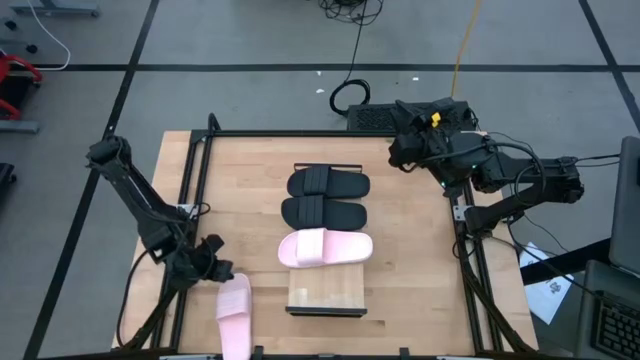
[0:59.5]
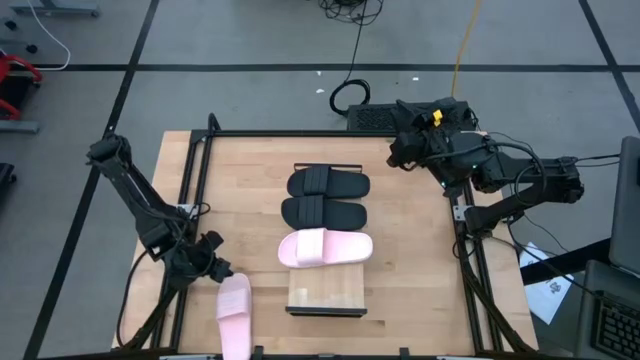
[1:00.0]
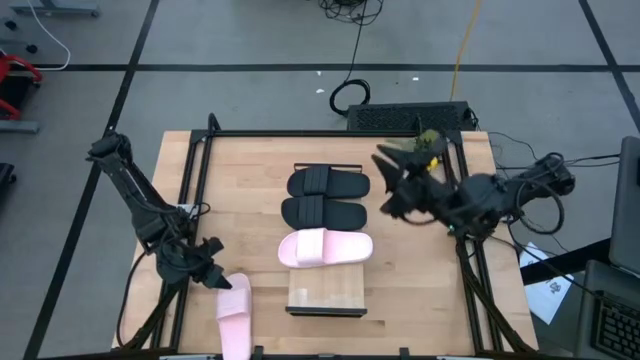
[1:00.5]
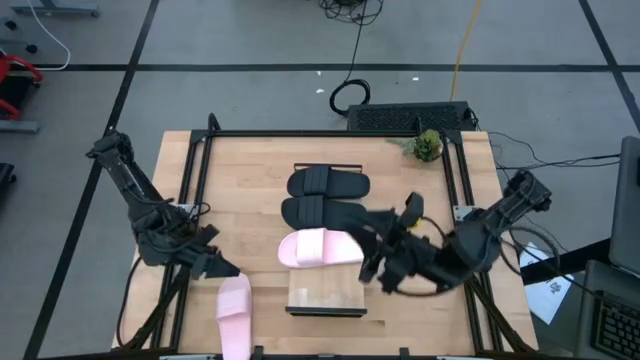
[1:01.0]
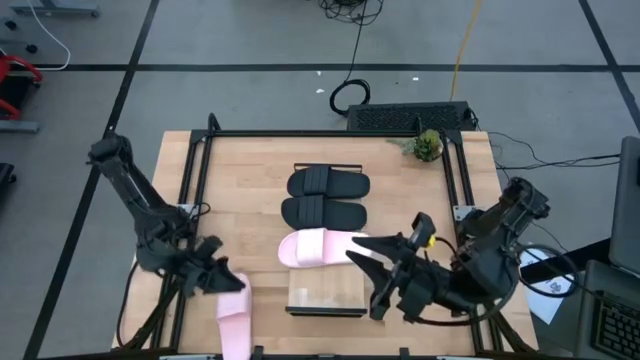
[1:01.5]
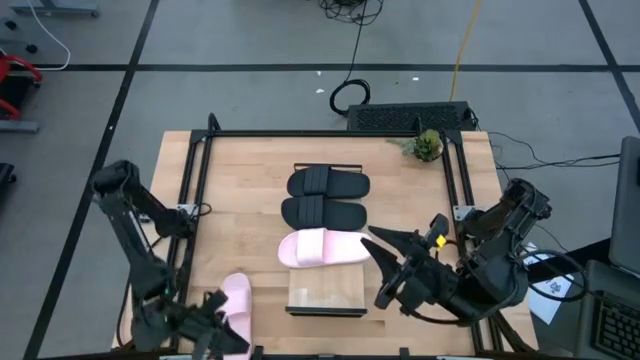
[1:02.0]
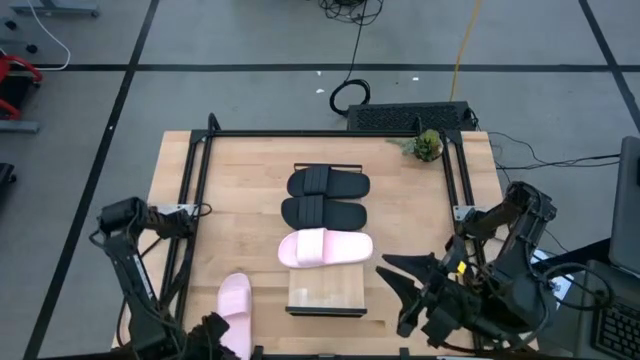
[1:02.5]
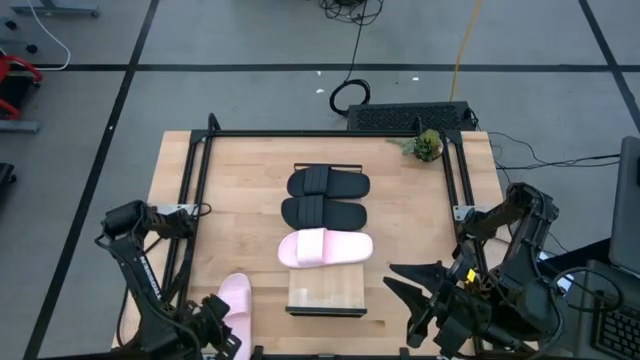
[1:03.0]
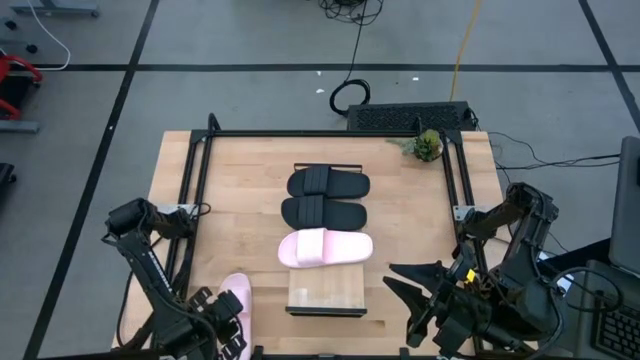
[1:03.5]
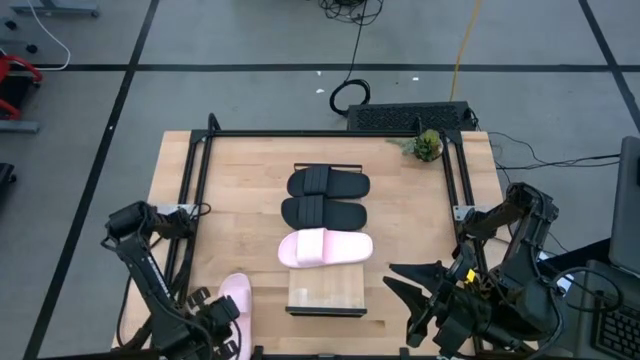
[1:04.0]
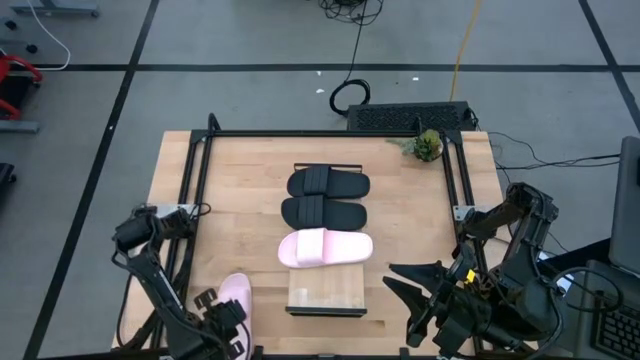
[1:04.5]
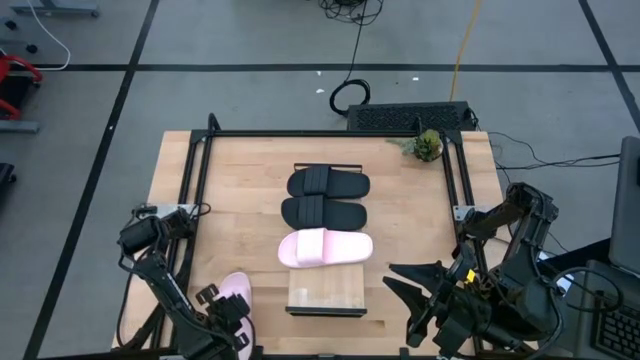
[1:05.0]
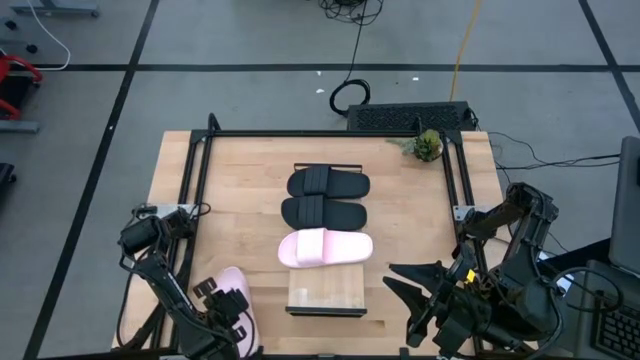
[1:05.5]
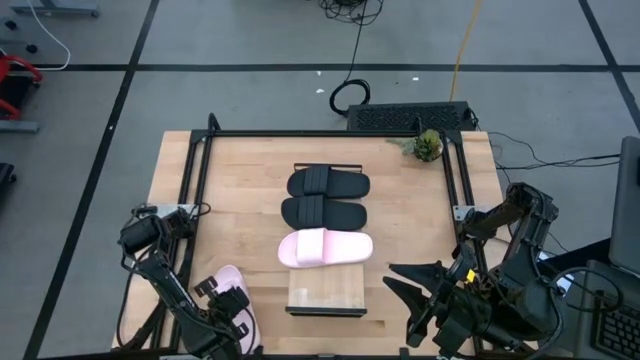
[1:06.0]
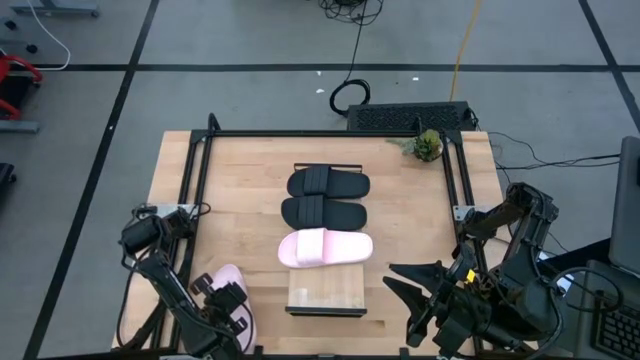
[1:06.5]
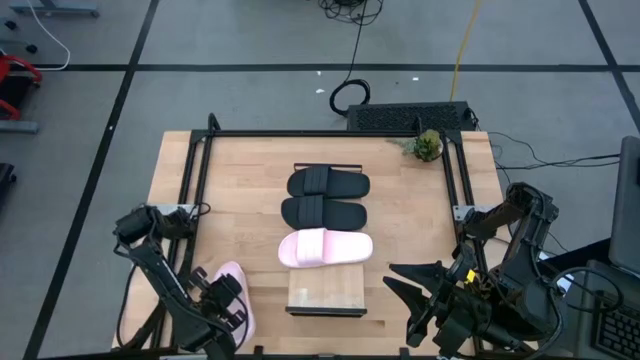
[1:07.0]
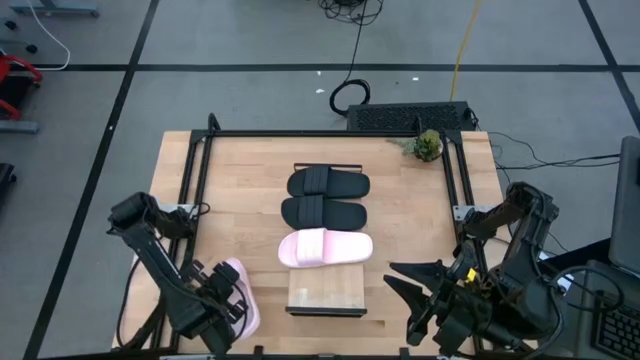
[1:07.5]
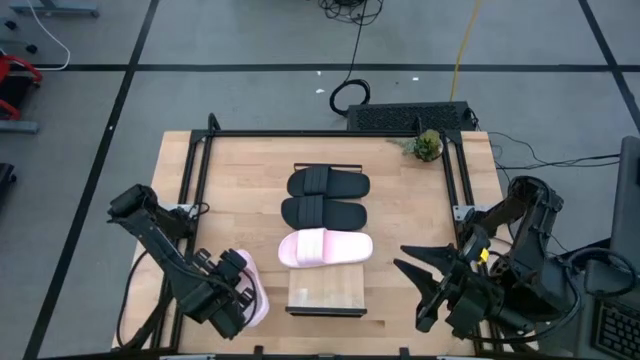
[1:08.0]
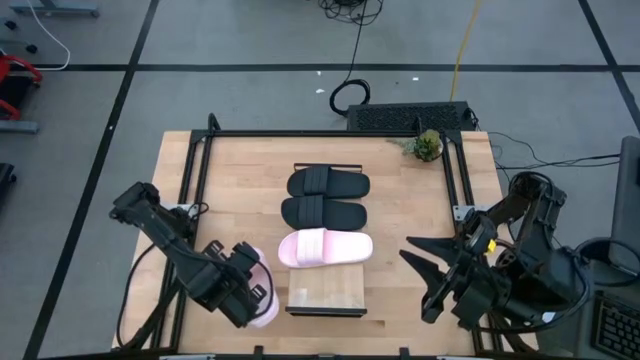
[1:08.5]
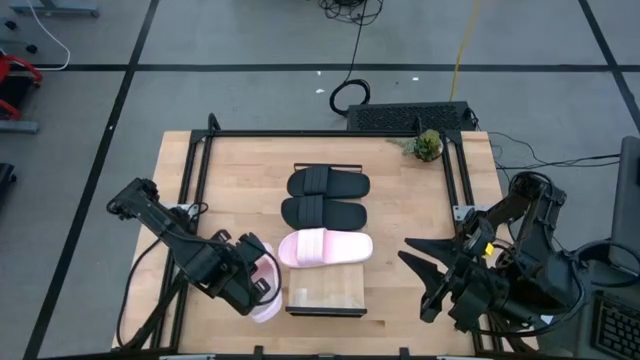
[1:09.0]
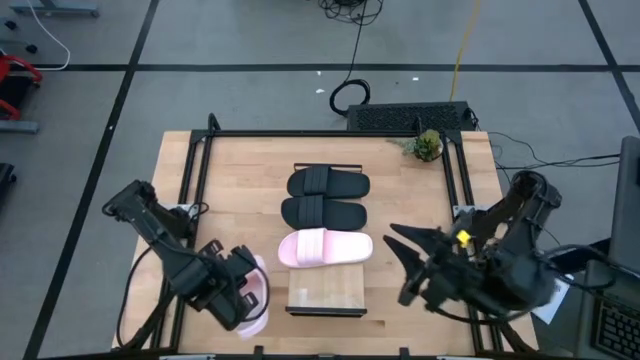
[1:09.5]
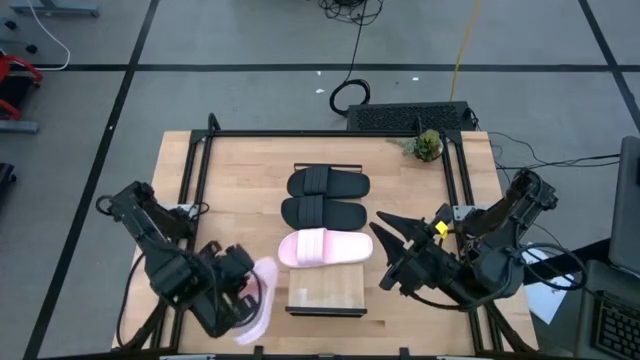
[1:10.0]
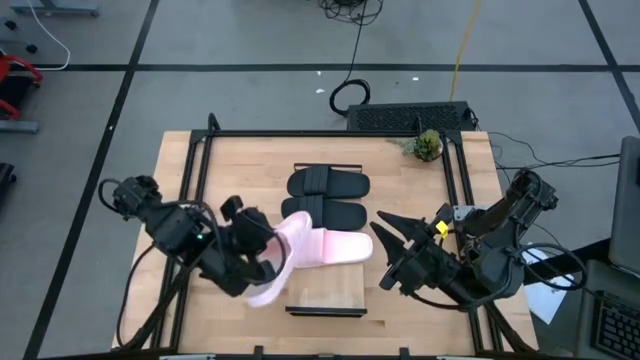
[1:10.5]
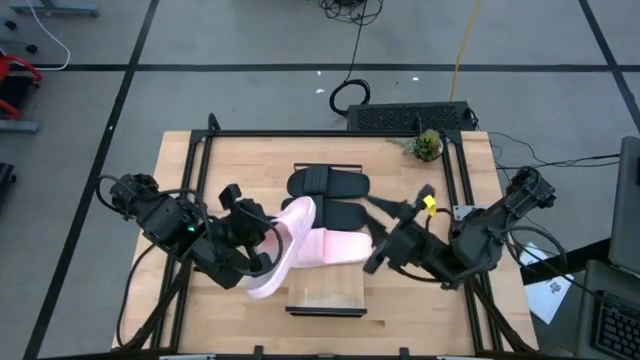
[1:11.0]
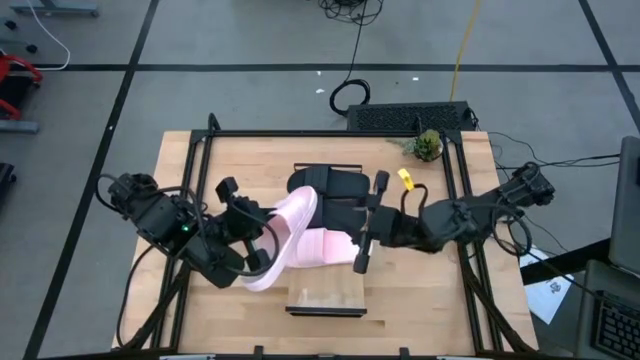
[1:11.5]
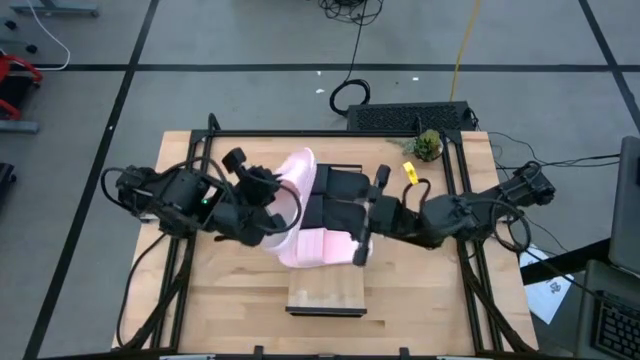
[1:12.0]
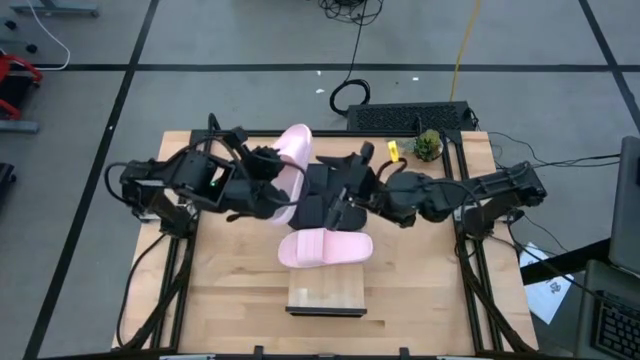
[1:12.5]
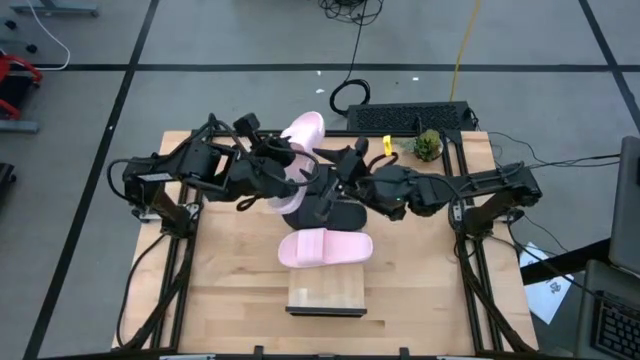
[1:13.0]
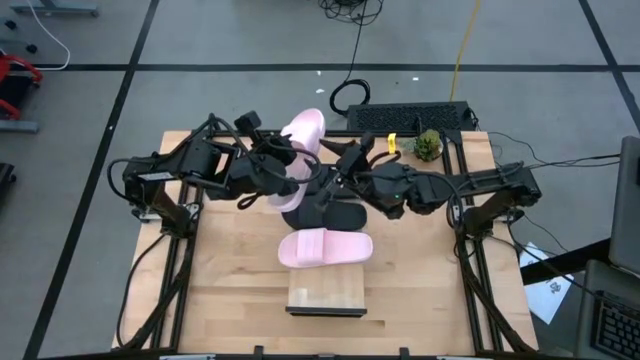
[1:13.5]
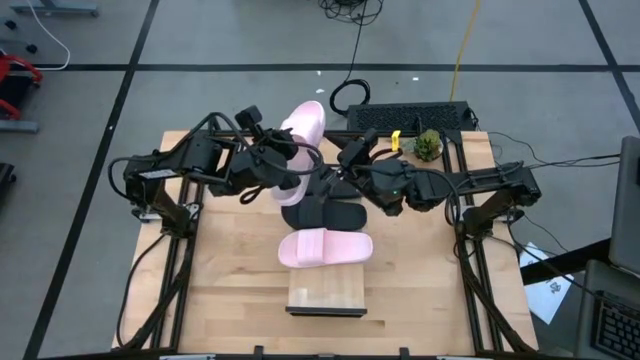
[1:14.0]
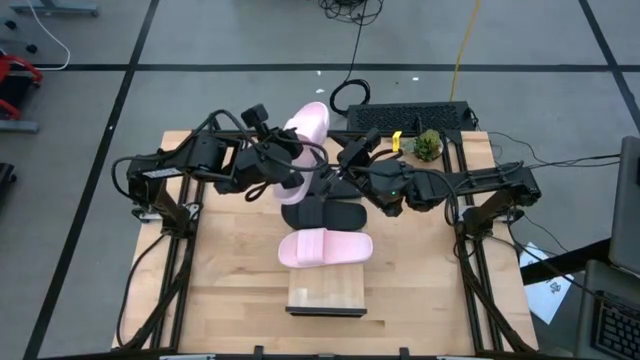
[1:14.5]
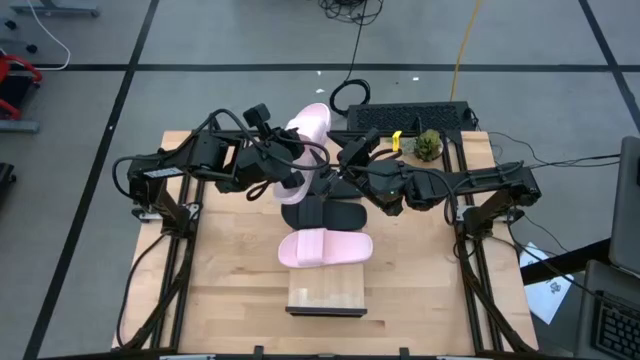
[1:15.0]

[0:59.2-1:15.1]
Task: Pick and place slides into the shelf
Put the pink slide on the shelf

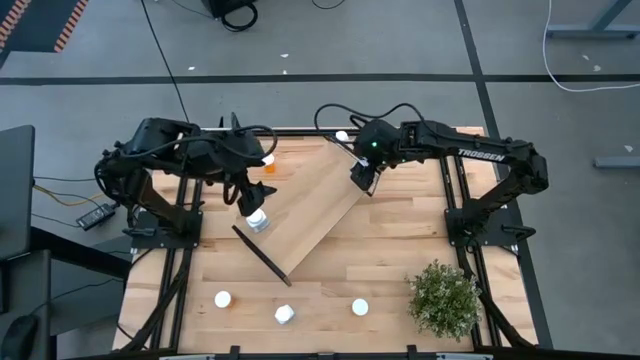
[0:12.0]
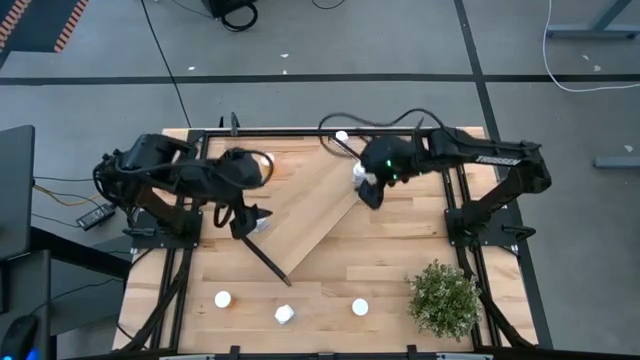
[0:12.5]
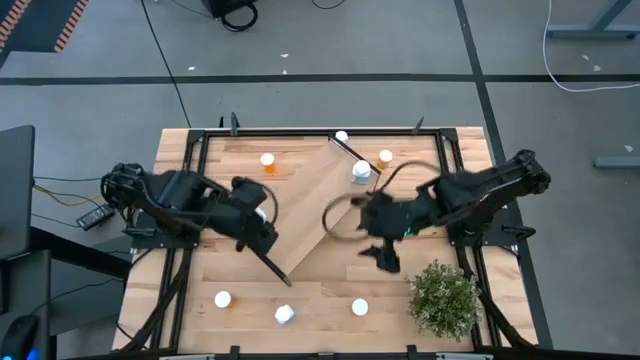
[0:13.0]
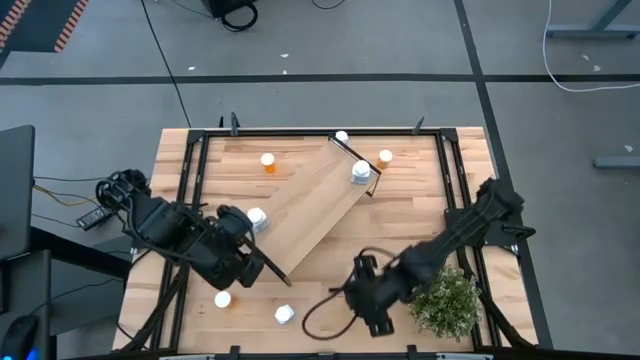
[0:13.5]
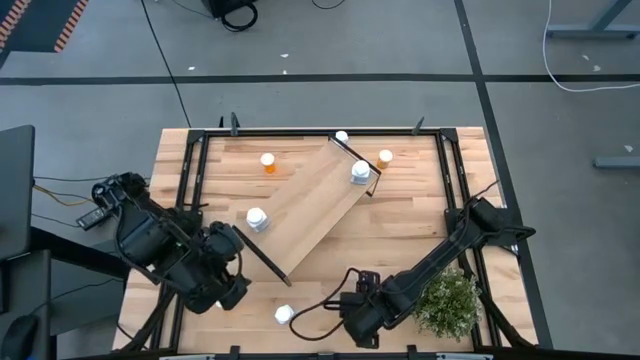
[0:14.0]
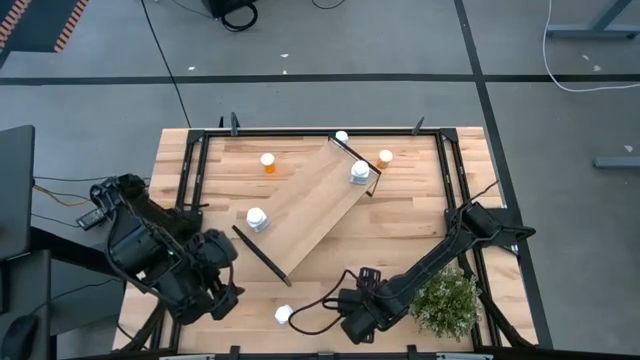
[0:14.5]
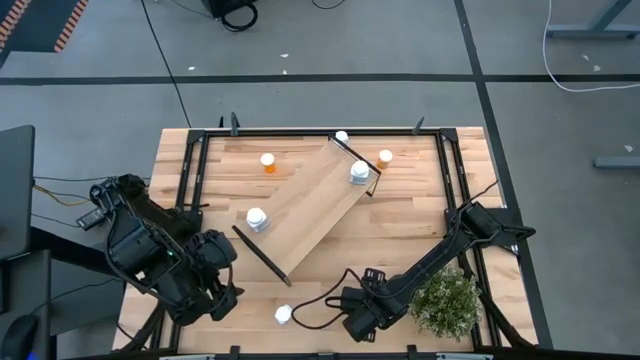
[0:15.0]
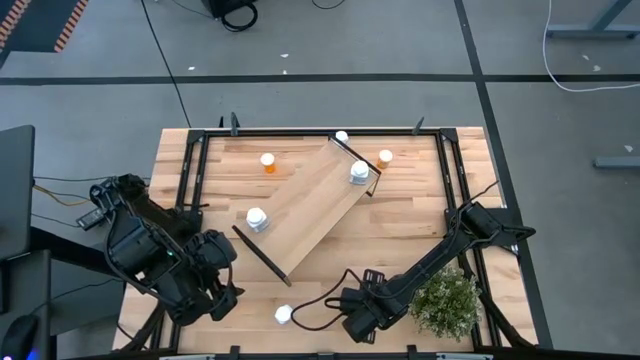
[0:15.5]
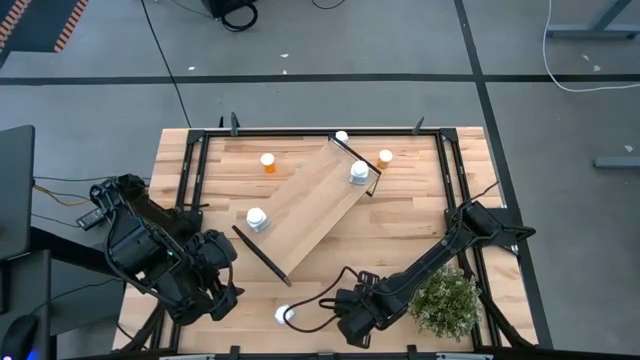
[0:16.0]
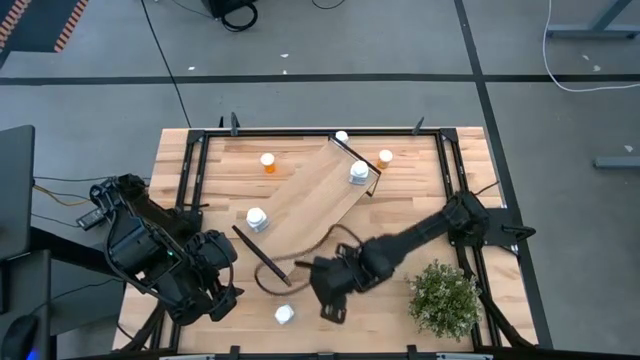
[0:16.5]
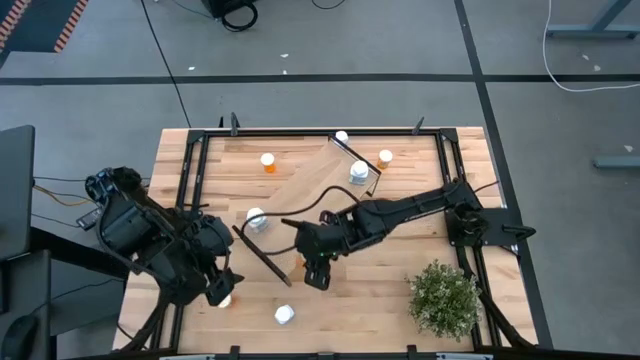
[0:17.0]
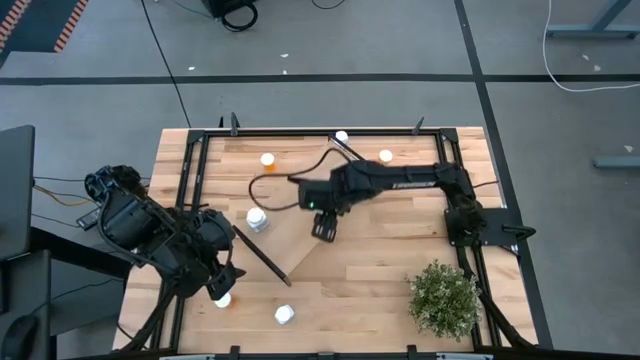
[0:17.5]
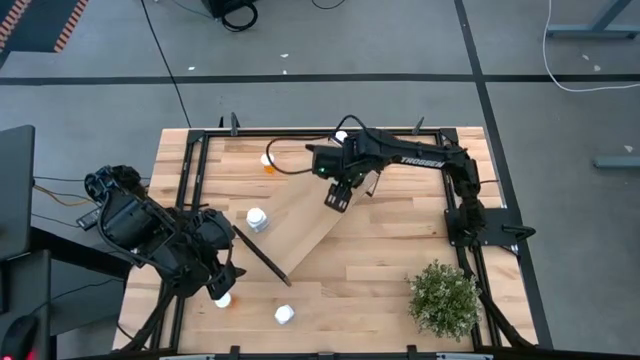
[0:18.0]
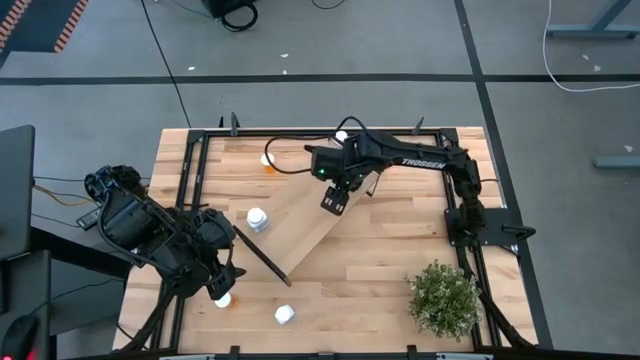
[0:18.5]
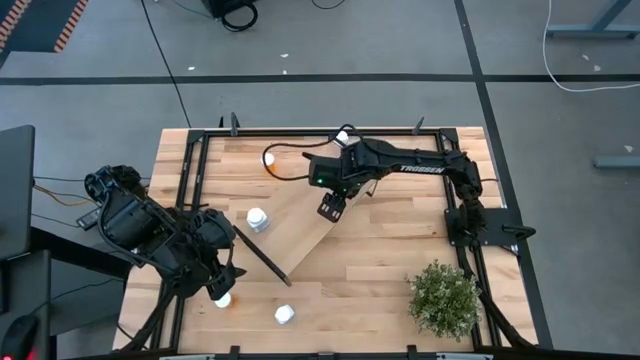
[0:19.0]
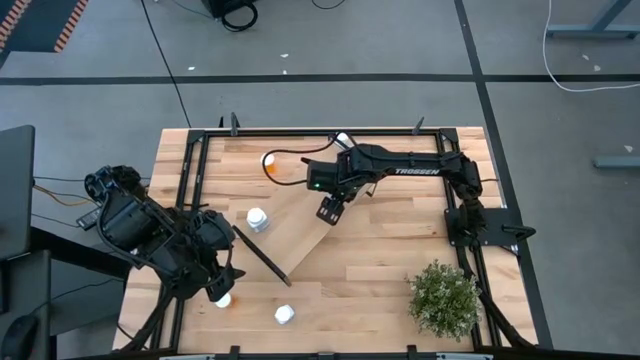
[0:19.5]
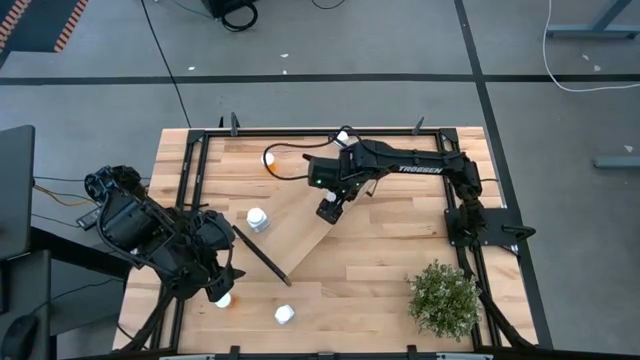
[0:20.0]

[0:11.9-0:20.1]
Task: Pick and place medicine bottles onto shelf by color
Put the orange pill bottle on the shelf
